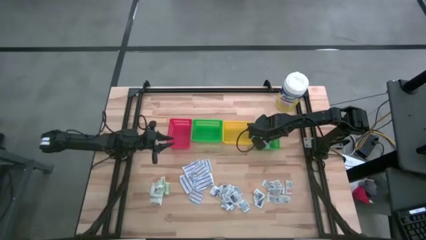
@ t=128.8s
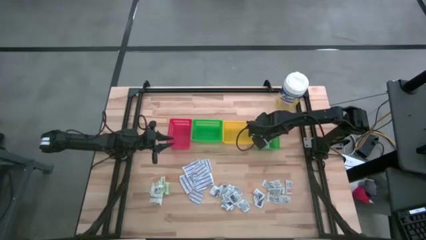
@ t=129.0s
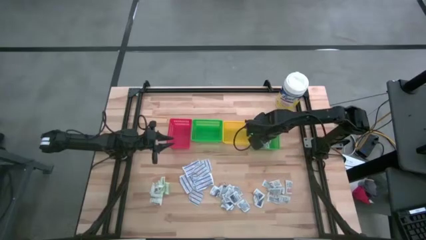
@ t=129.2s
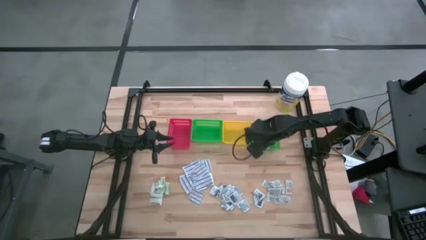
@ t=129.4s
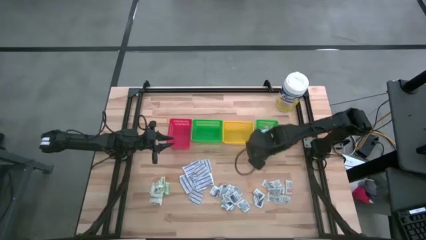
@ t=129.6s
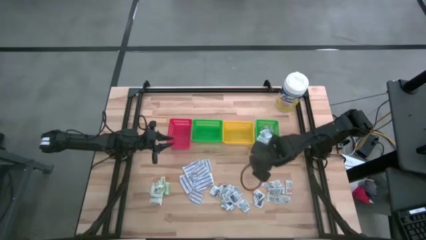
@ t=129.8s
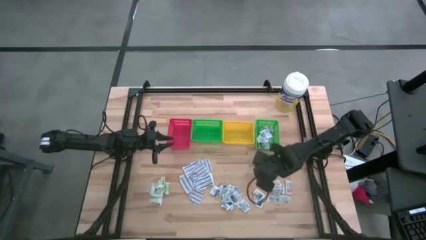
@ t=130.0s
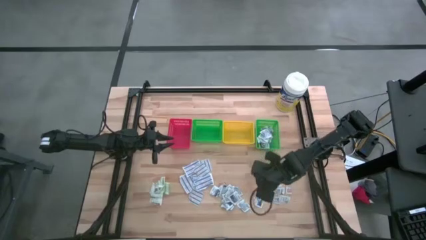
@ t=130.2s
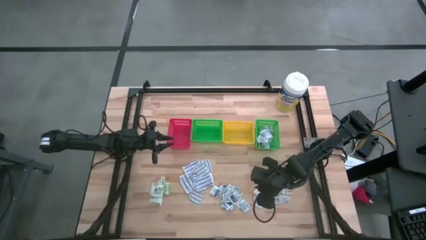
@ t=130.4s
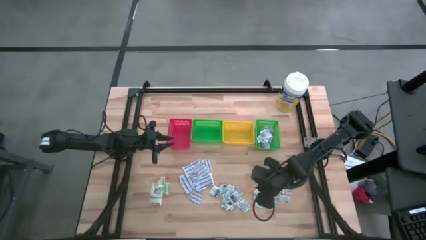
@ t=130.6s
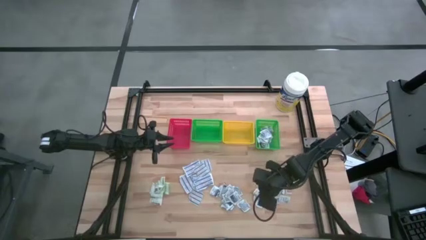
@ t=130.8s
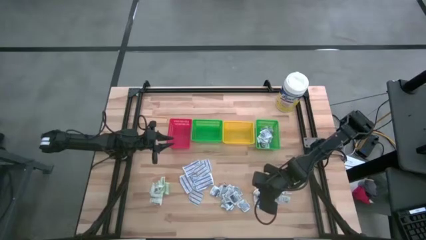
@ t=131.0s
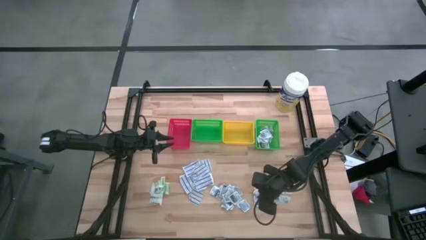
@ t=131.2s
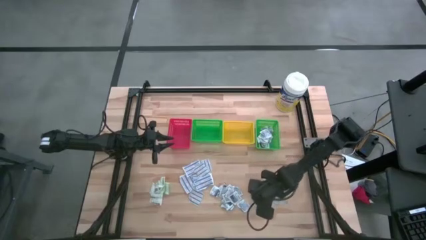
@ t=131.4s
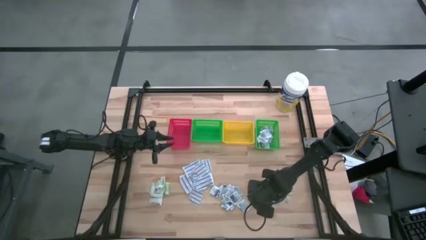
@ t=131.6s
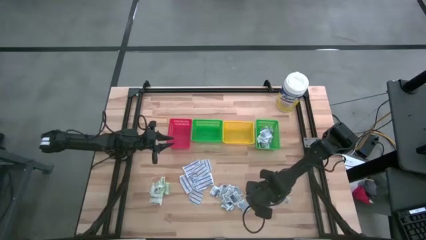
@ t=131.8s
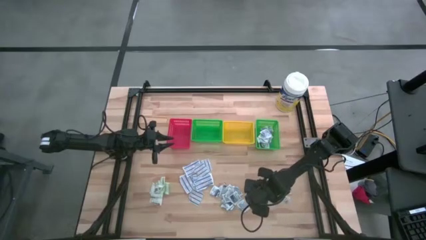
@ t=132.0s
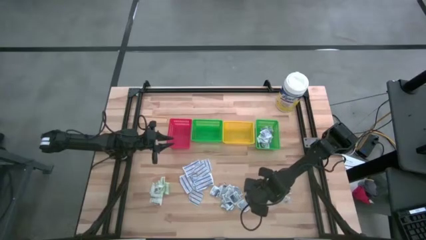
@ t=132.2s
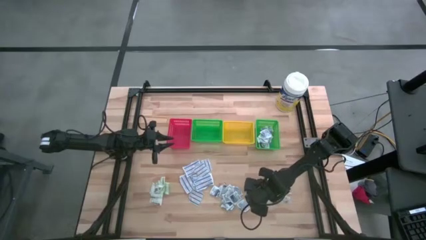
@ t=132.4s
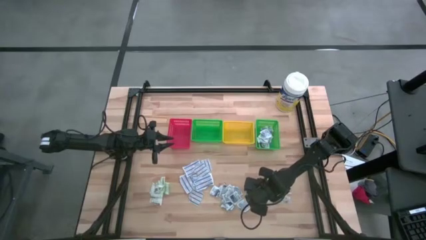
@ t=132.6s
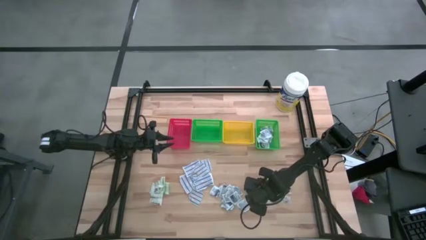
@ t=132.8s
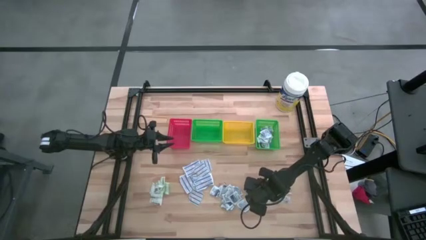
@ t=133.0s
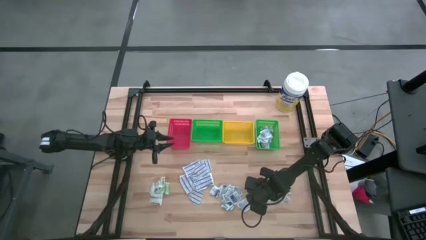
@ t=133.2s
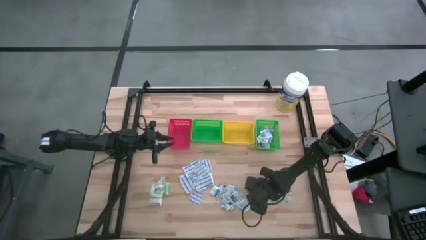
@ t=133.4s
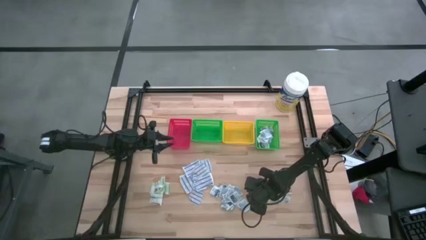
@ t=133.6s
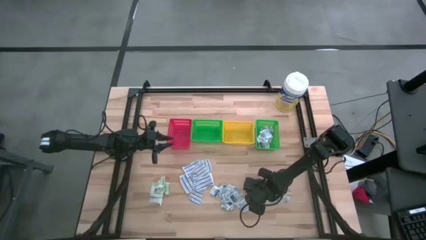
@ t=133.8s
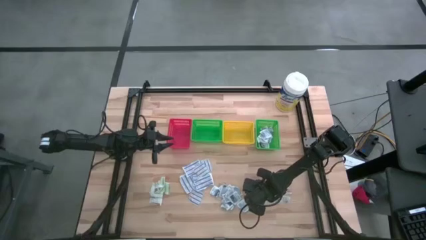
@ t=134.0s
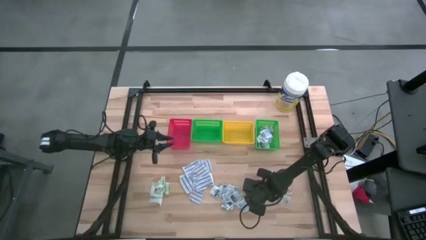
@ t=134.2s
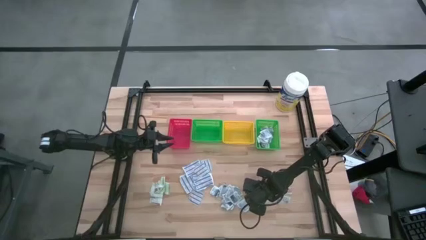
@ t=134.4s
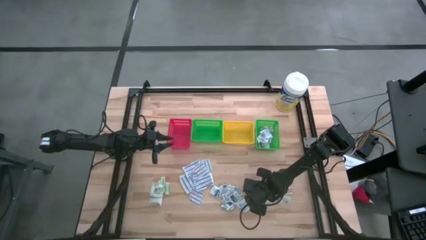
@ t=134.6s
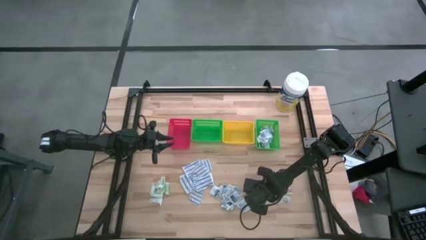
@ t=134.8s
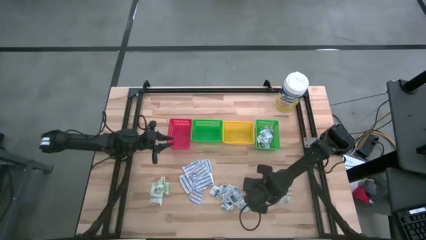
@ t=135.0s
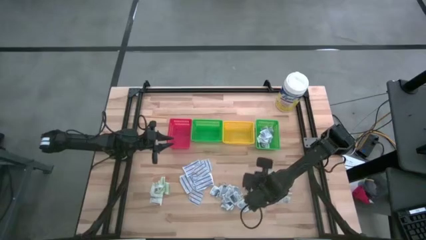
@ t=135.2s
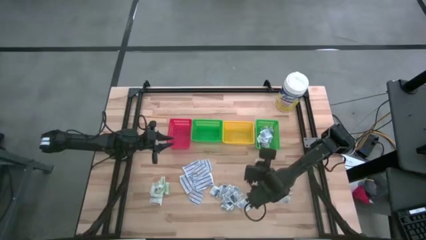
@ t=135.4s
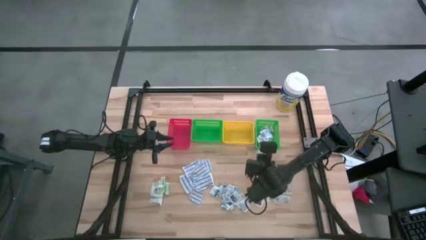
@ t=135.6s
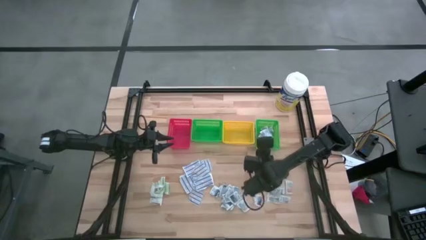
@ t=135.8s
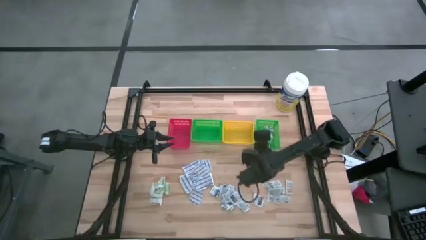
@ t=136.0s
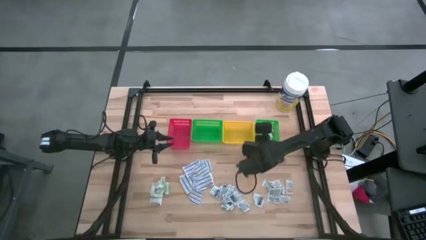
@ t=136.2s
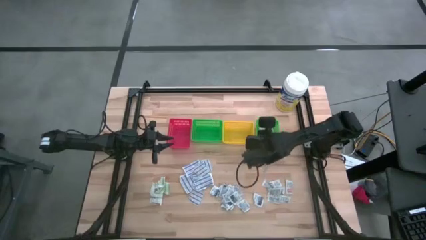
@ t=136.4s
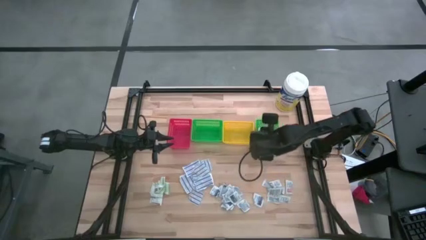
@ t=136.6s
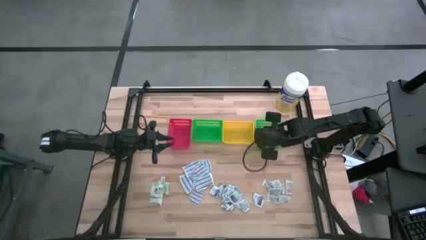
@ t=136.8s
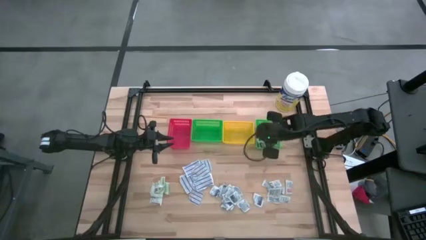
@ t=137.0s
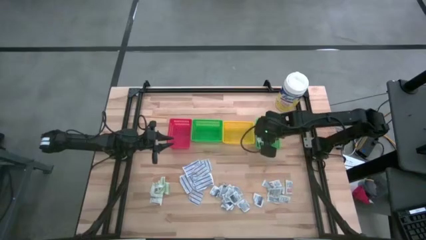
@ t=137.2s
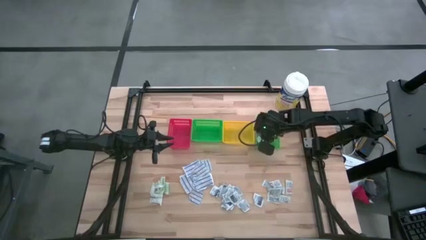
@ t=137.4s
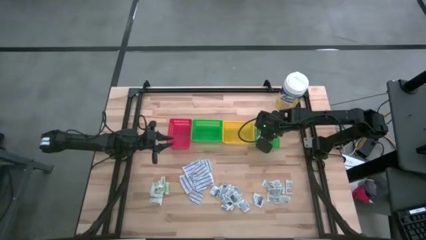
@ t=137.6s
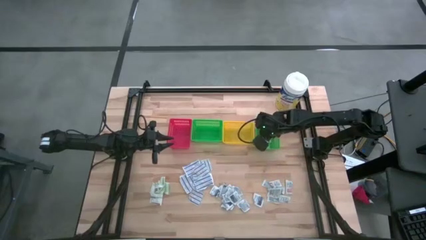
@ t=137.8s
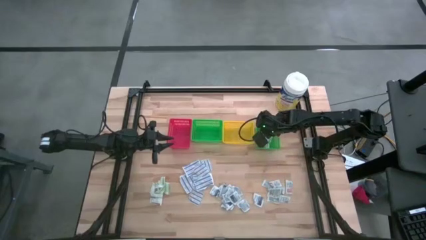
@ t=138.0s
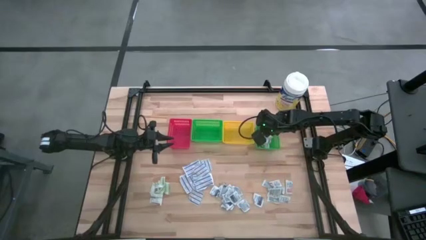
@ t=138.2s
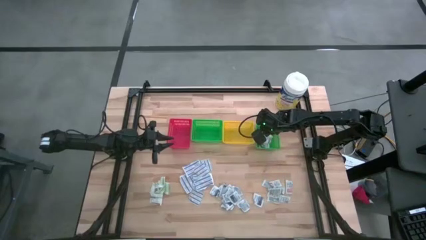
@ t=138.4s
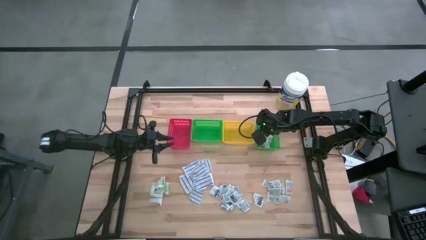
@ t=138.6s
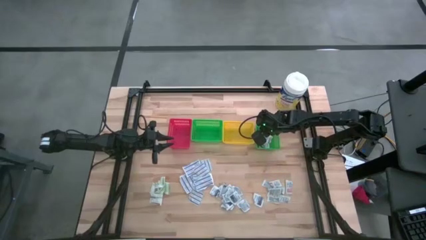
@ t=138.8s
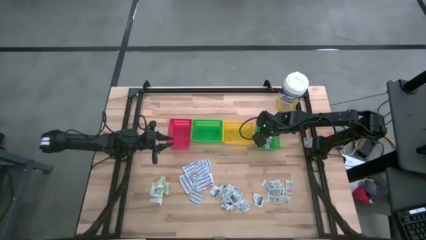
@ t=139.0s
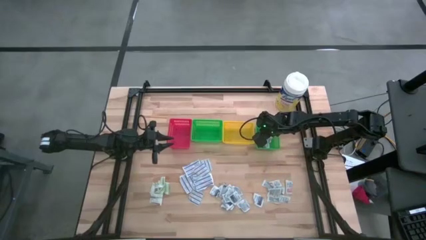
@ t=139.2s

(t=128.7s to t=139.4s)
Task: Pick & Place First Aid Supplies
Put the blue alcohol pad into the right green bin

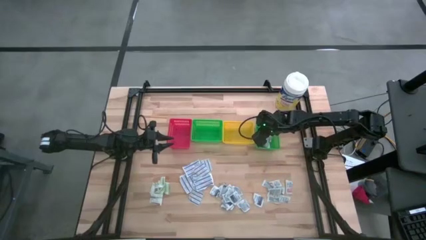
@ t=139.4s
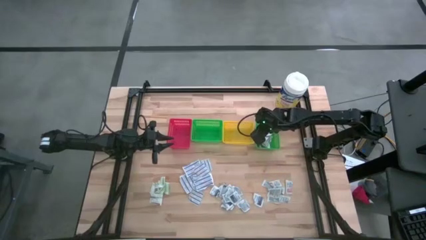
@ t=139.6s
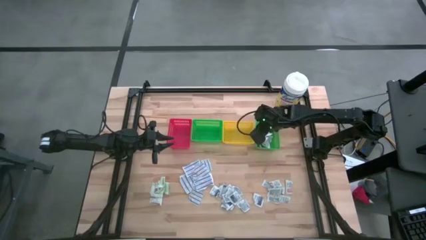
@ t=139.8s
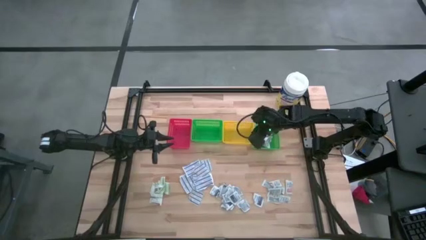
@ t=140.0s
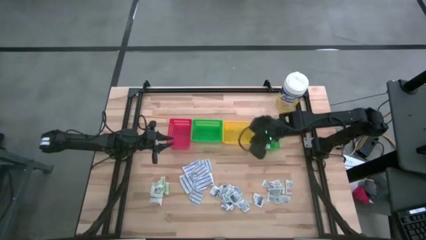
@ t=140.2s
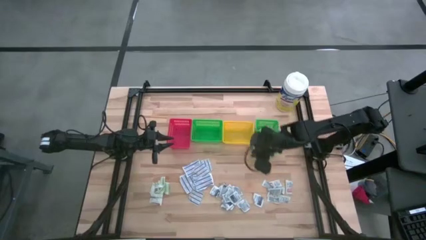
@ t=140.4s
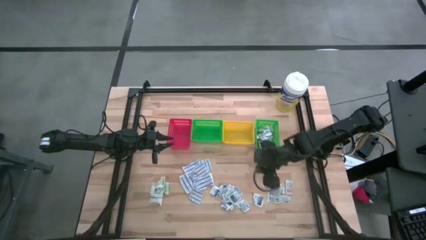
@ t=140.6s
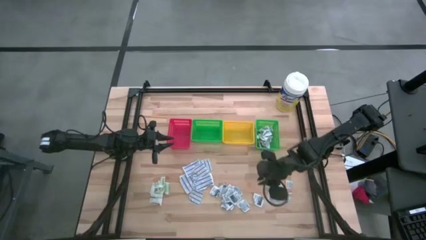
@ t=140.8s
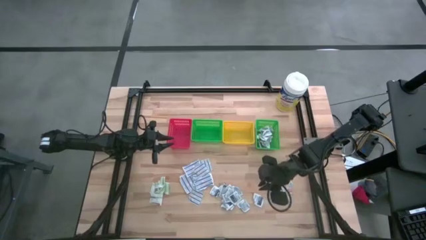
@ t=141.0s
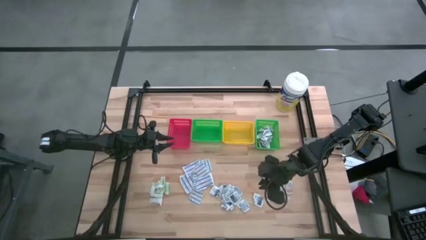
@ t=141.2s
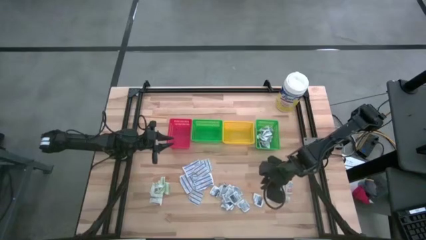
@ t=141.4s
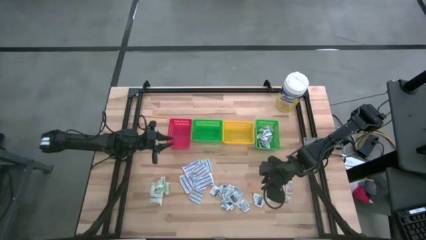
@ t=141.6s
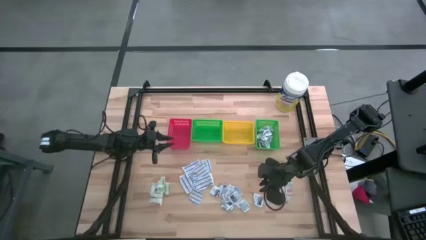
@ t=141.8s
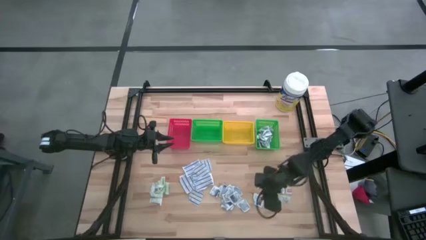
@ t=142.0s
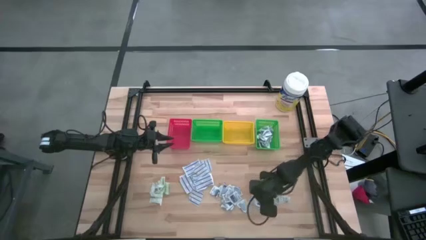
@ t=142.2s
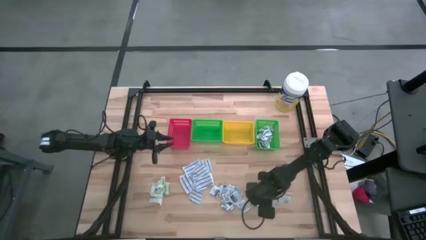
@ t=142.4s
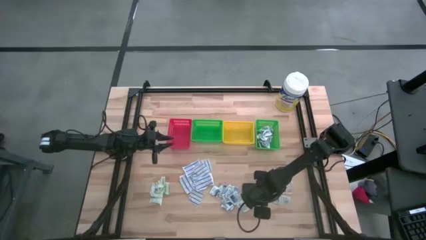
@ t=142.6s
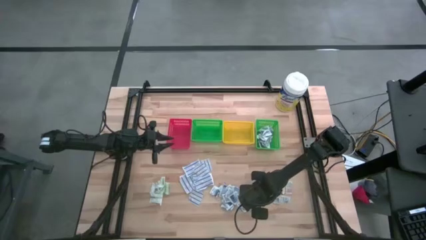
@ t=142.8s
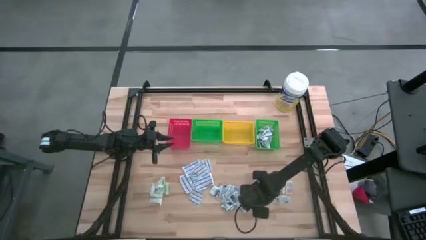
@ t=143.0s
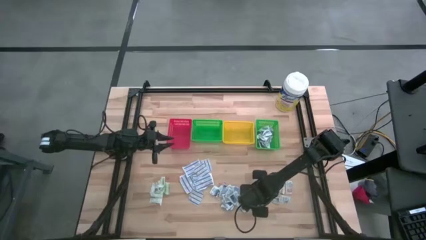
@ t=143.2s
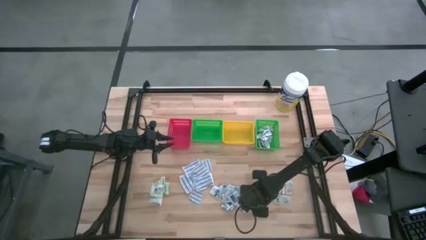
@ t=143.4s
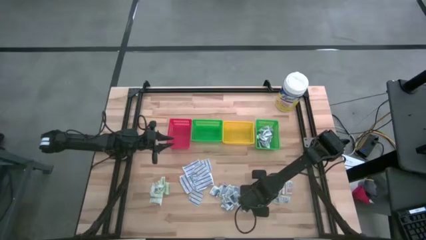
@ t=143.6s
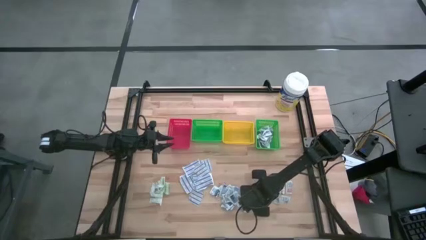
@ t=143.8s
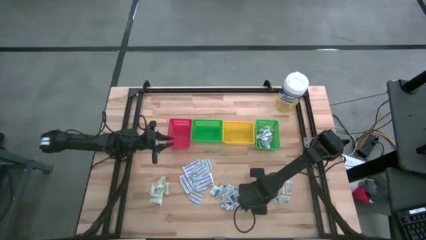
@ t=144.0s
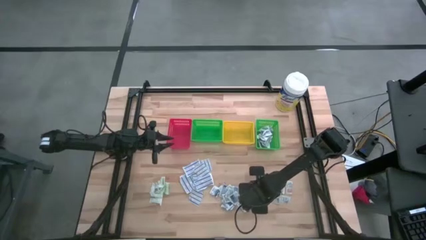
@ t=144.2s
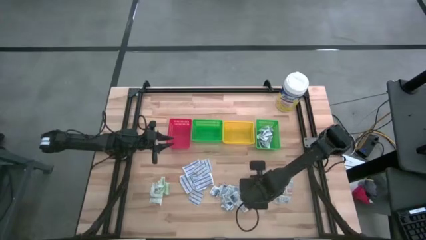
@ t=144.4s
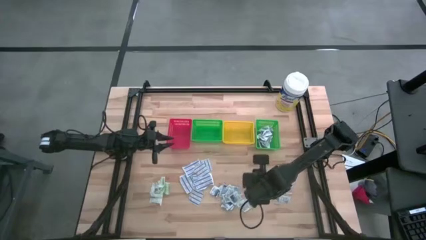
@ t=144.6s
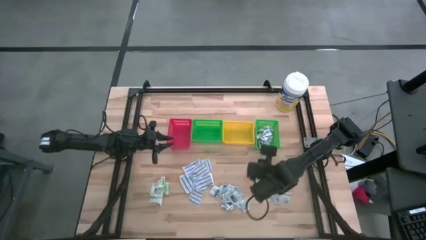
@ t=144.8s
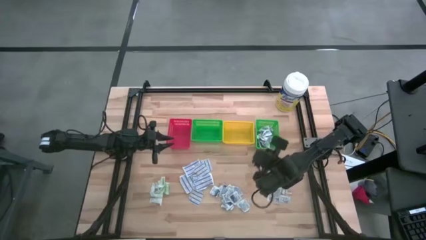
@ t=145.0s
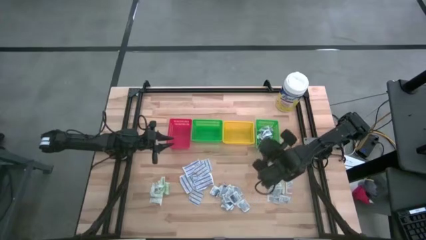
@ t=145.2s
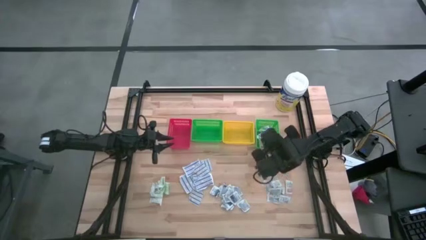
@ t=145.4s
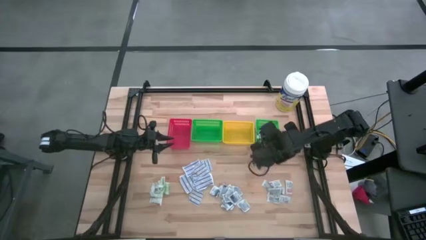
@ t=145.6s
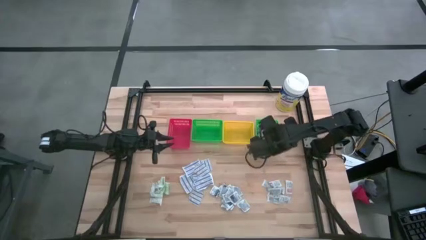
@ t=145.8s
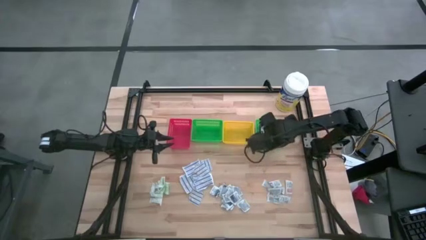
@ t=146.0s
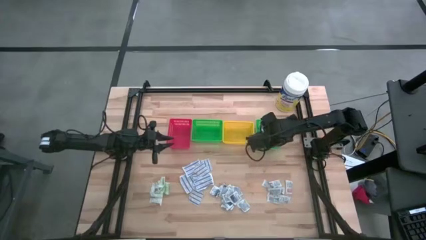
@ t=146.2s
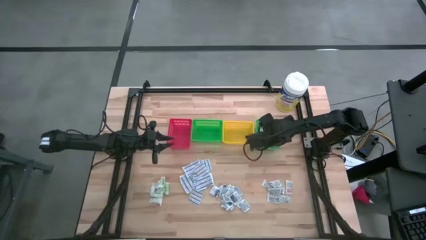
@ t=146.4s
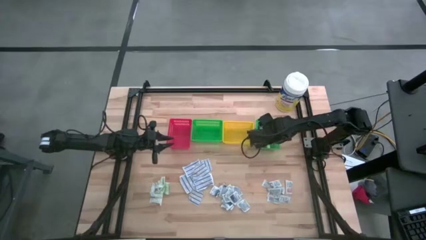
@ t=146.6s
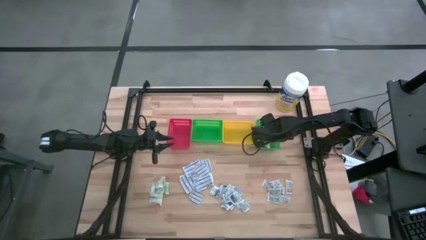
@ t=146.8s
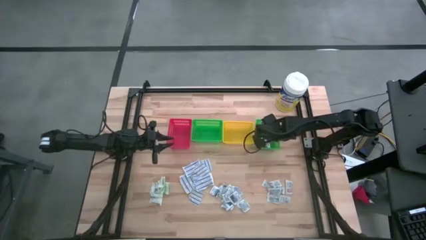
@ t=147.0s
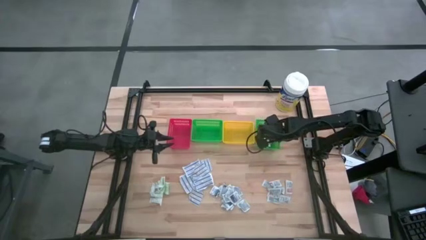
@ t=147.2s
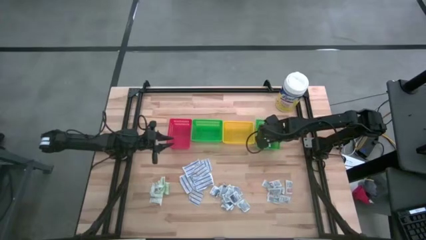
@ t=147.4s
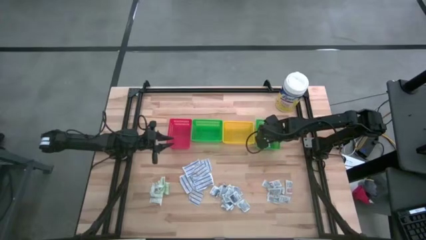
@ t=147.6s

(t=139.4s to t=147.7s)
Put the blue alcohol pad into the right green bin
